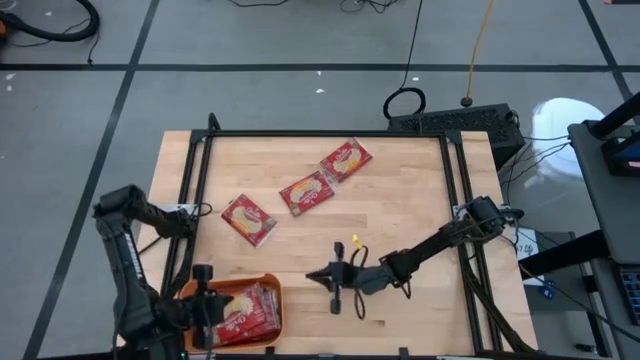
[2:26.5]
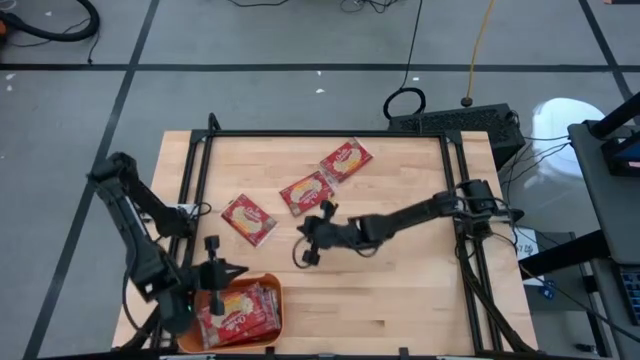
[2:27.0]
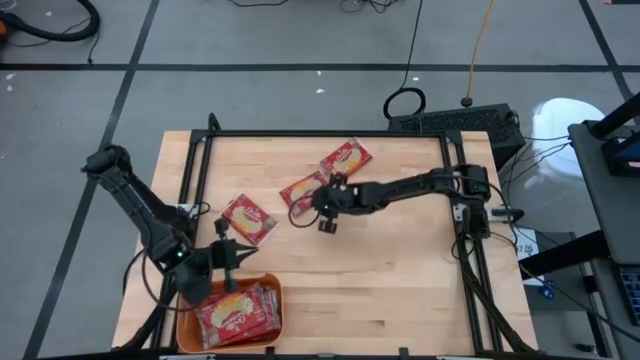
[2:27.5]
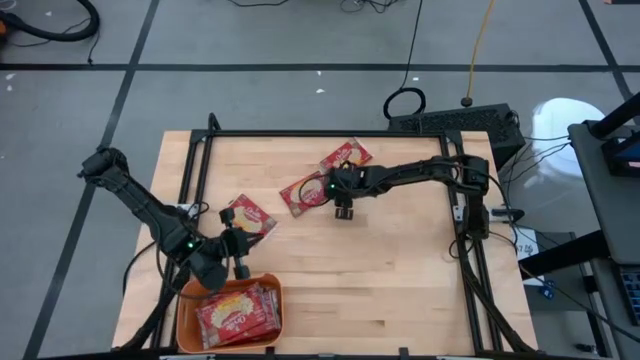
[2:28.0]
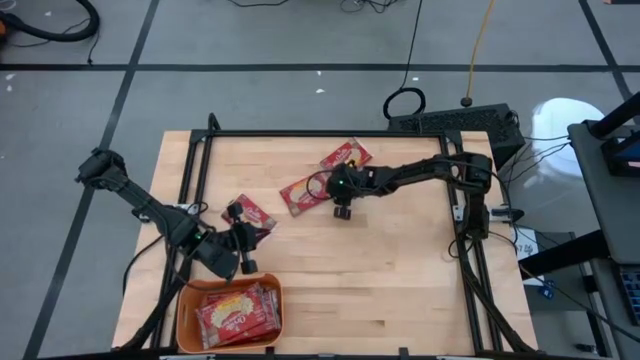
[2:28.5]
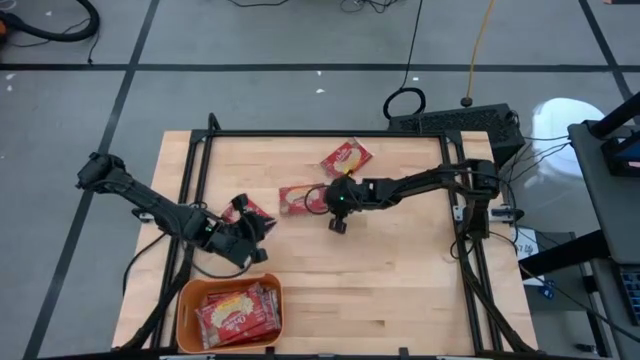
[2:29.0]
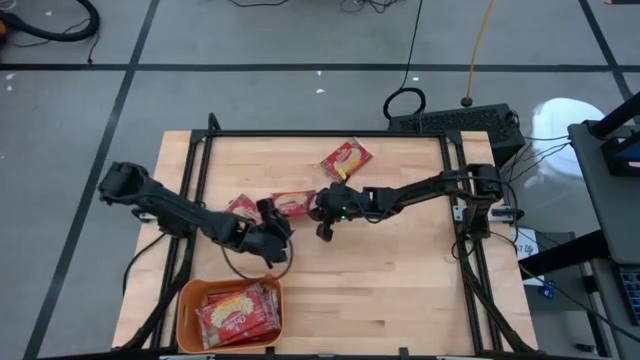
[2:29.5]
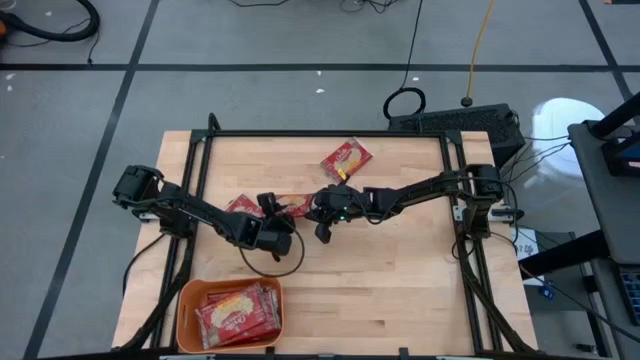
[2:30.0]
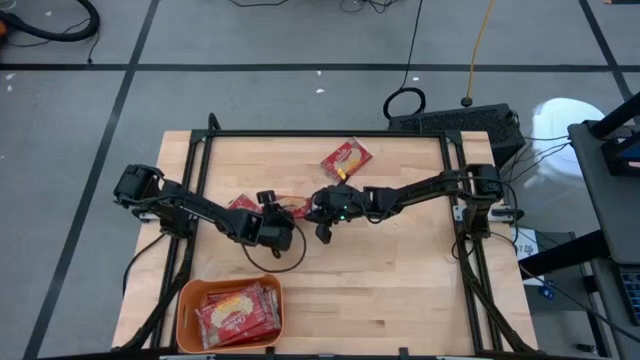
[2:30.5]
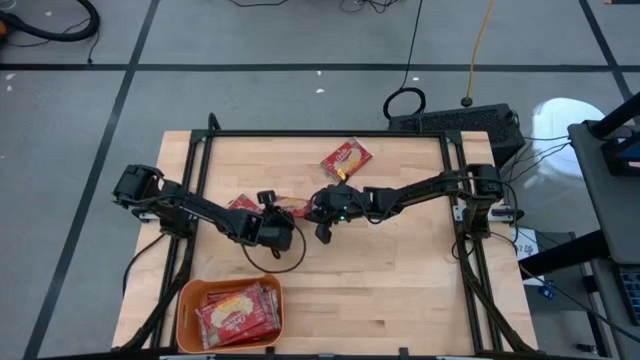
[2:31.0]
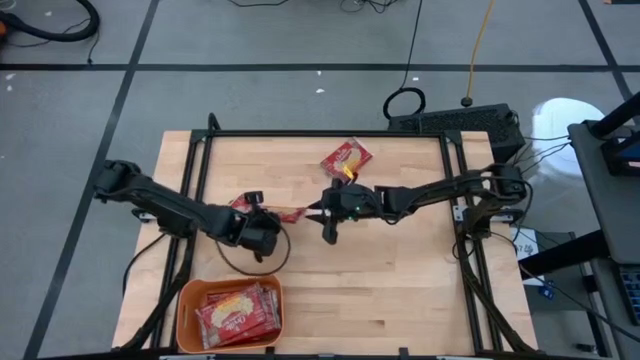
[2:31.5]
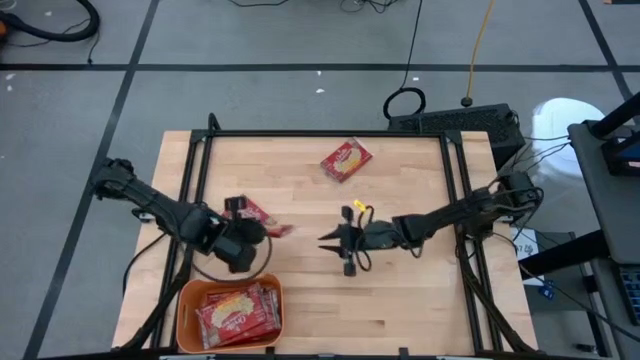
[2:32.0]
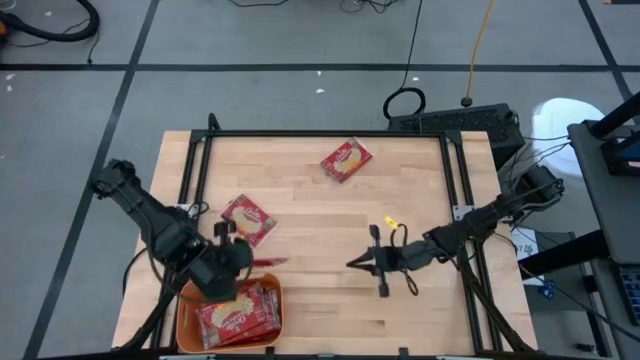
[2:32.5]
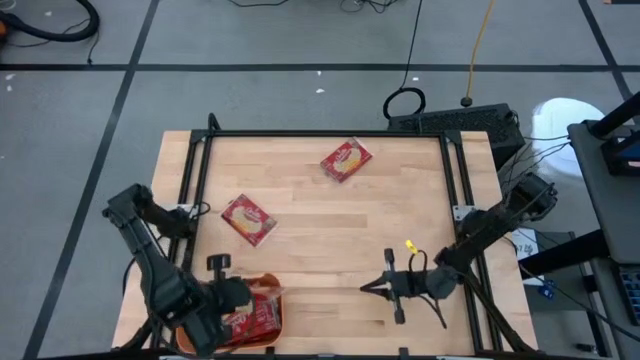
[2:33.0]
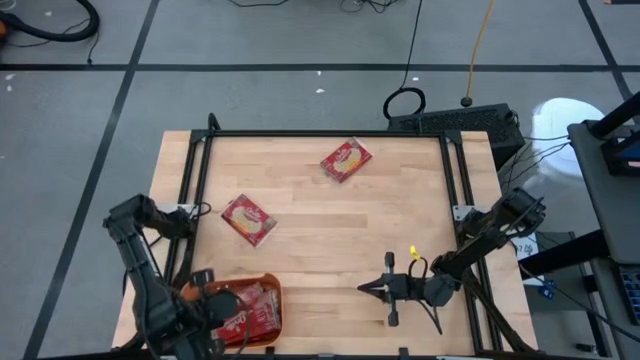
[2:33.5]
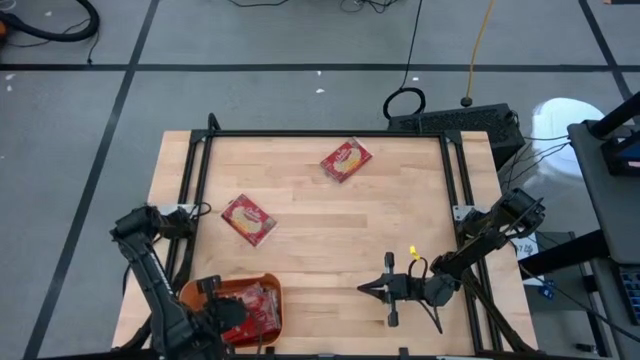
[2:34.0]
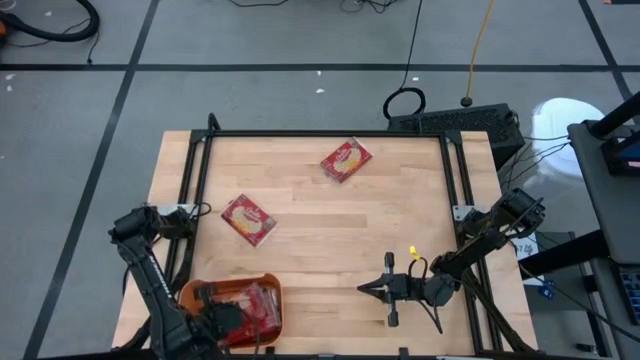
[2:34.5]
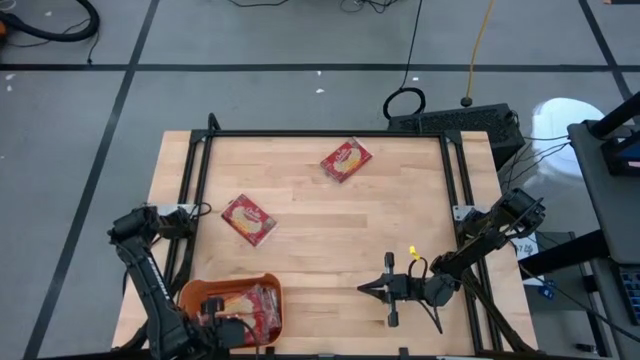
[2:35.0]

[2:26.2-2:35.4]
Task: Sort popcorn bags into baskets
Put the popcorn bag into the orange bin

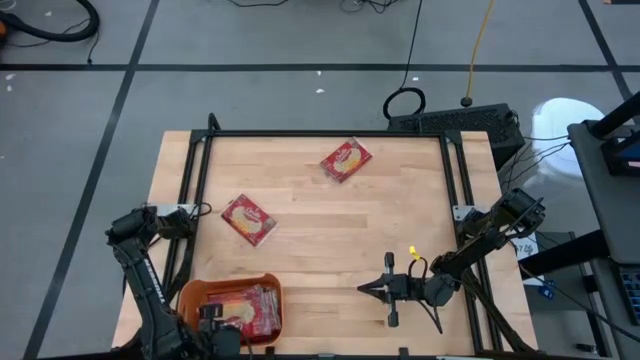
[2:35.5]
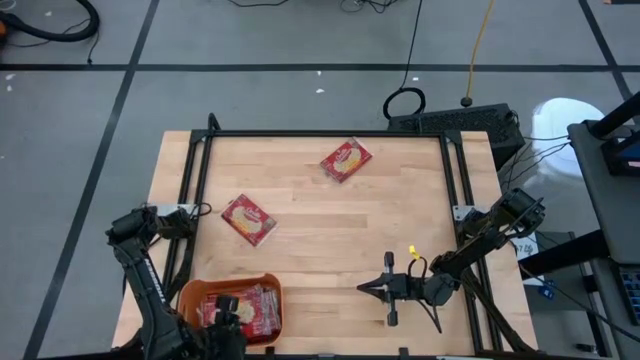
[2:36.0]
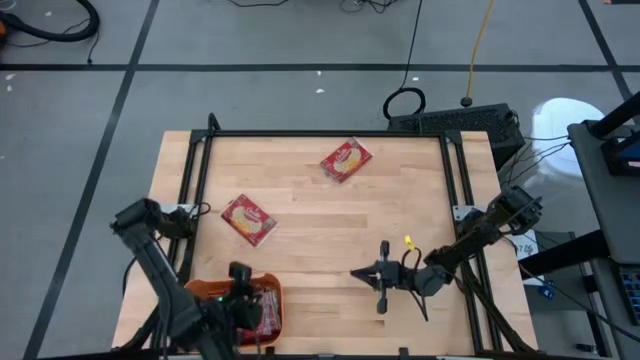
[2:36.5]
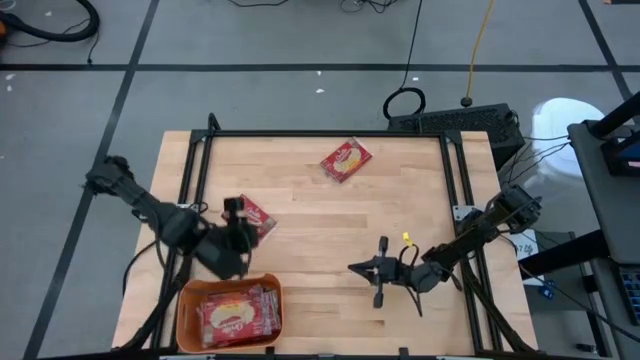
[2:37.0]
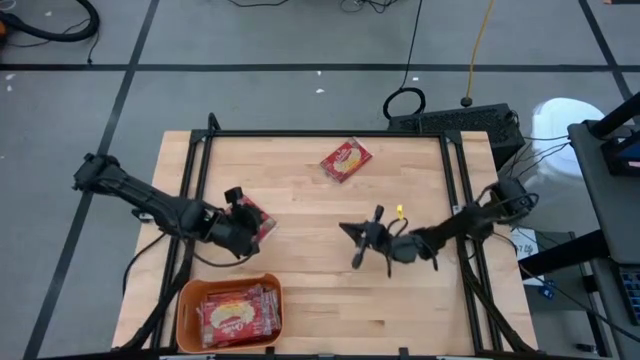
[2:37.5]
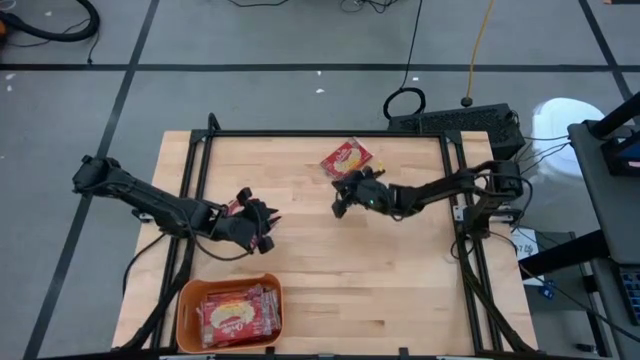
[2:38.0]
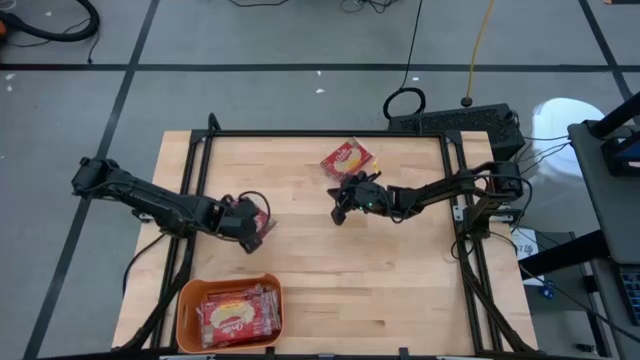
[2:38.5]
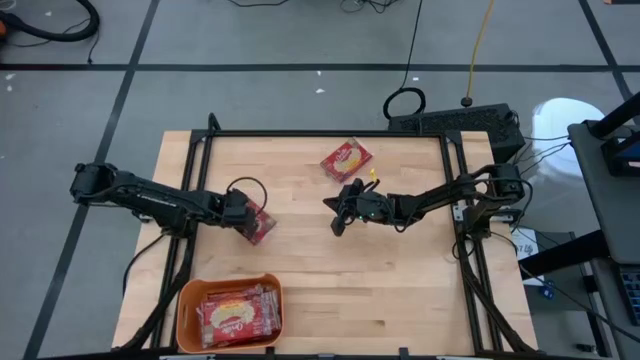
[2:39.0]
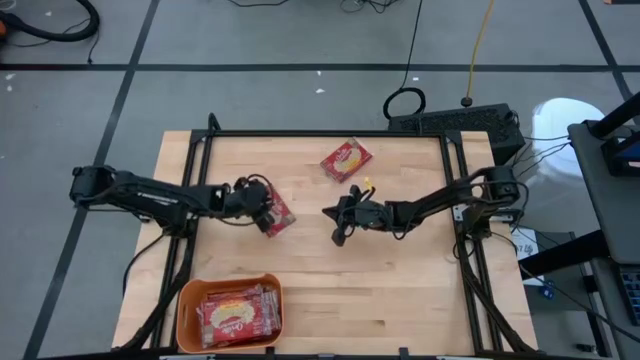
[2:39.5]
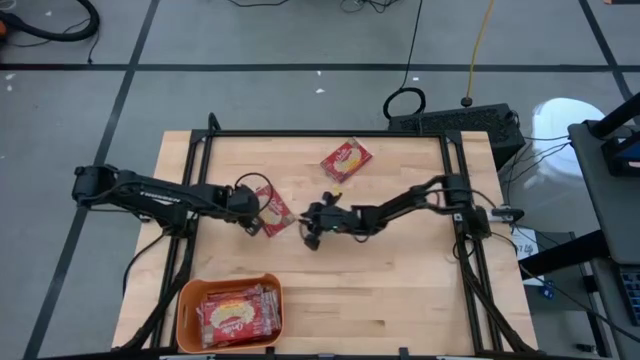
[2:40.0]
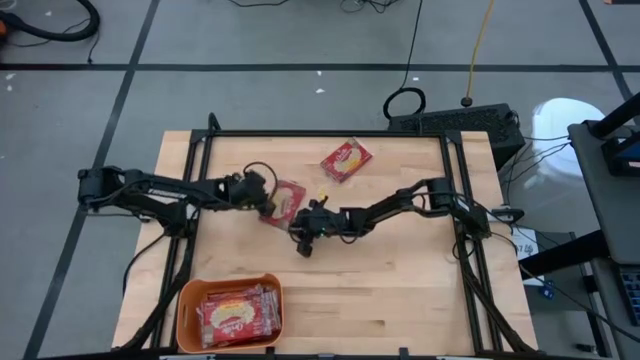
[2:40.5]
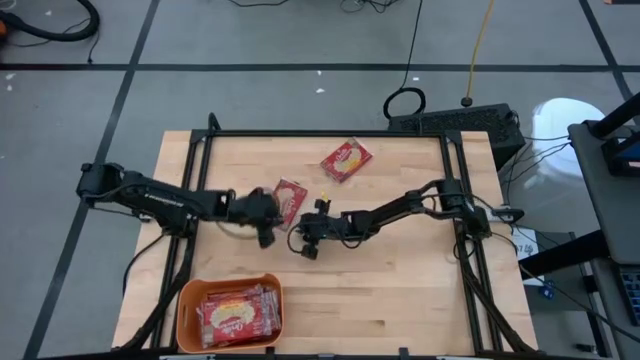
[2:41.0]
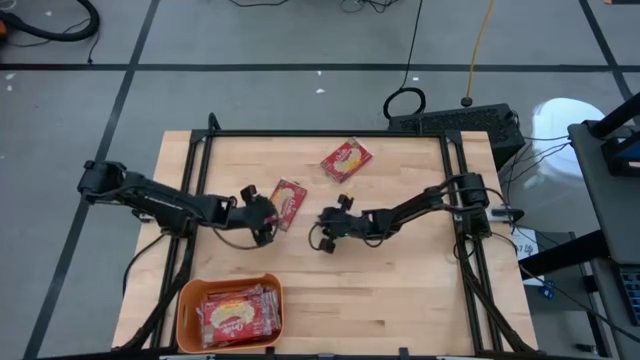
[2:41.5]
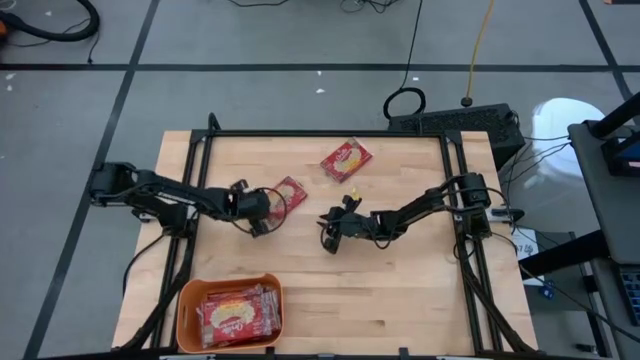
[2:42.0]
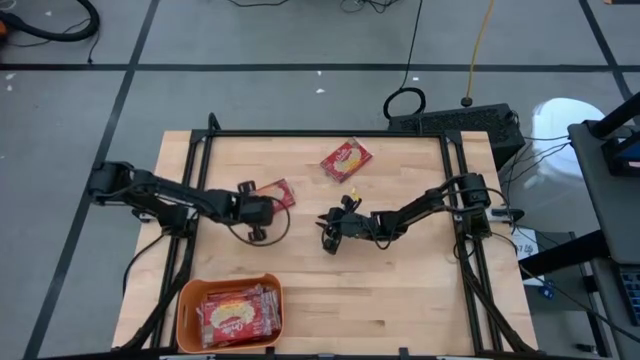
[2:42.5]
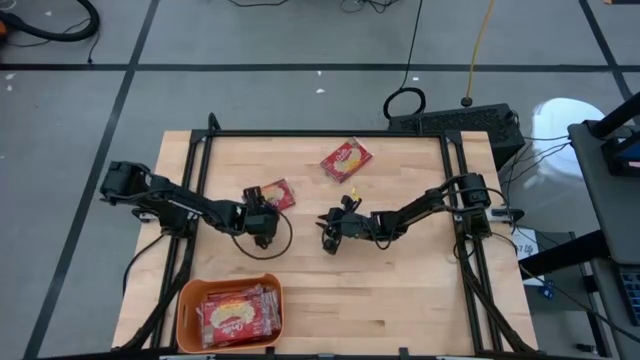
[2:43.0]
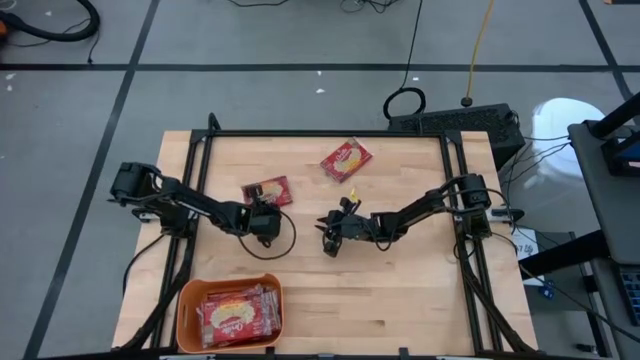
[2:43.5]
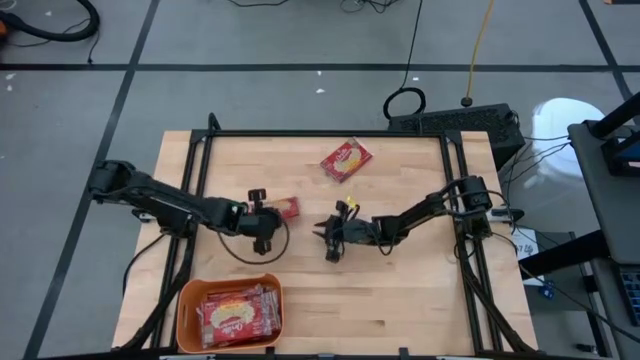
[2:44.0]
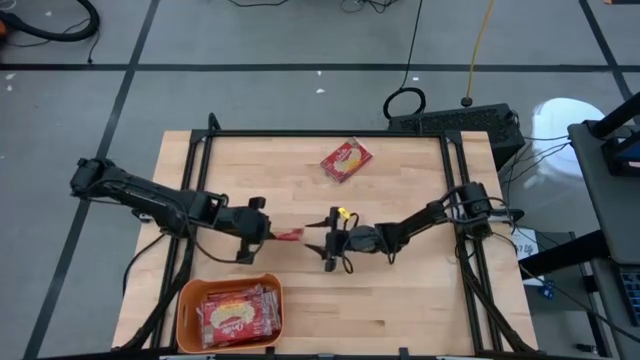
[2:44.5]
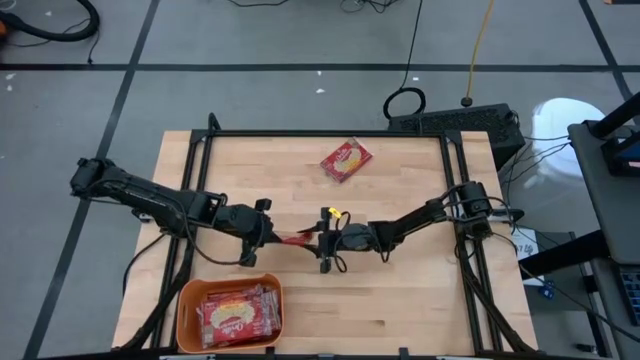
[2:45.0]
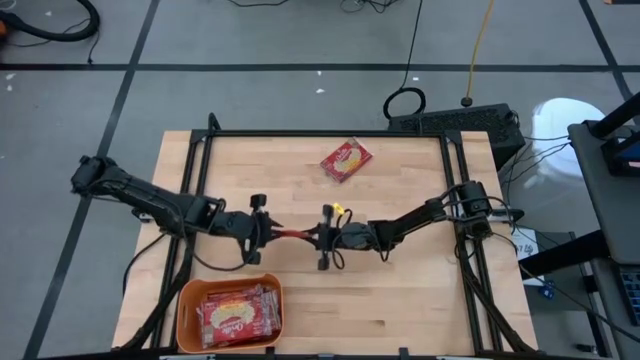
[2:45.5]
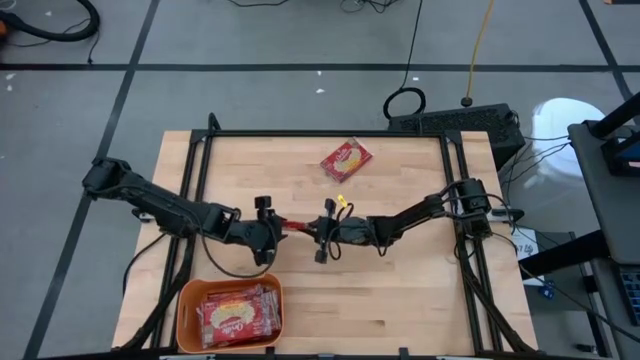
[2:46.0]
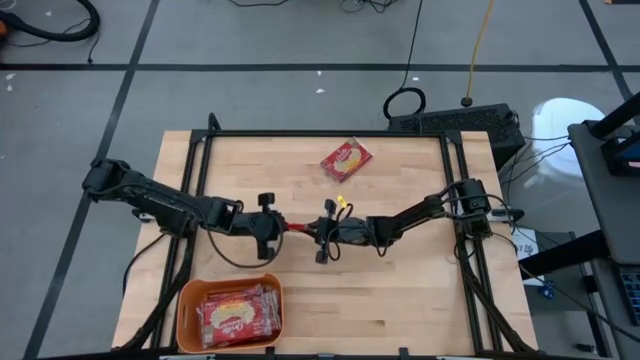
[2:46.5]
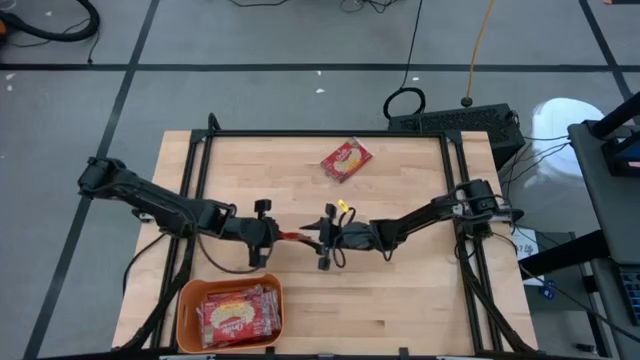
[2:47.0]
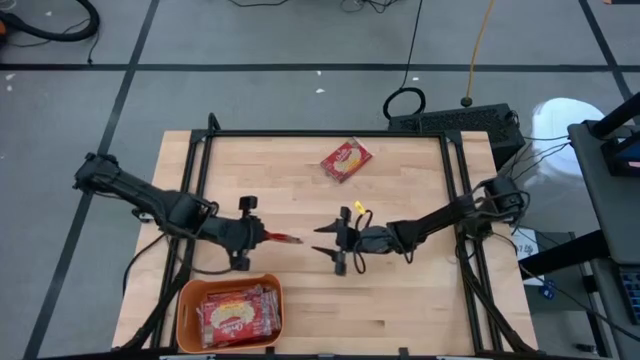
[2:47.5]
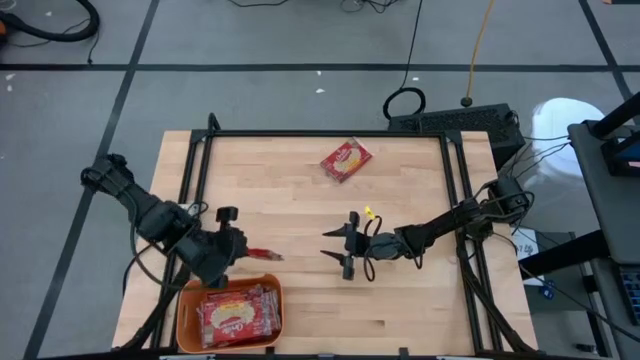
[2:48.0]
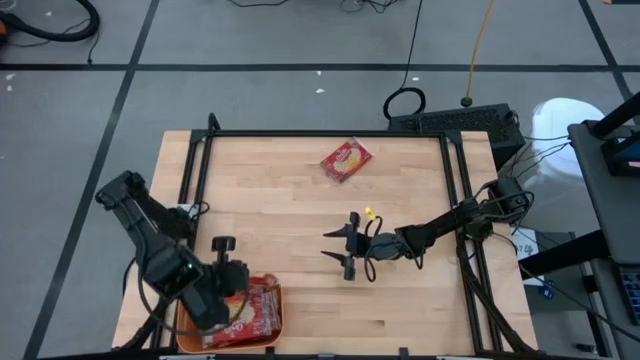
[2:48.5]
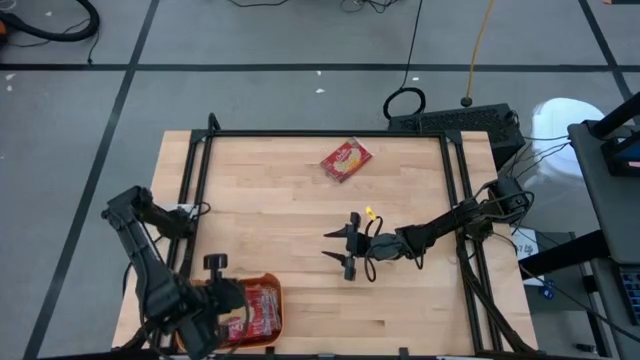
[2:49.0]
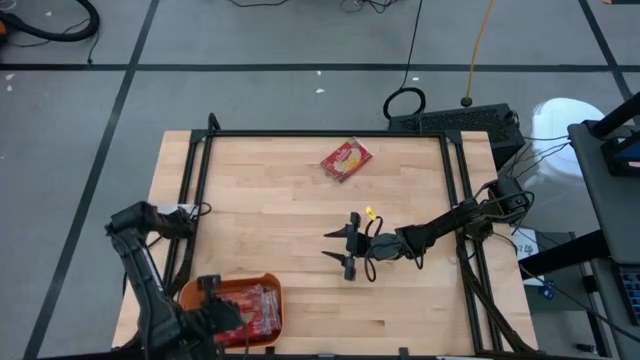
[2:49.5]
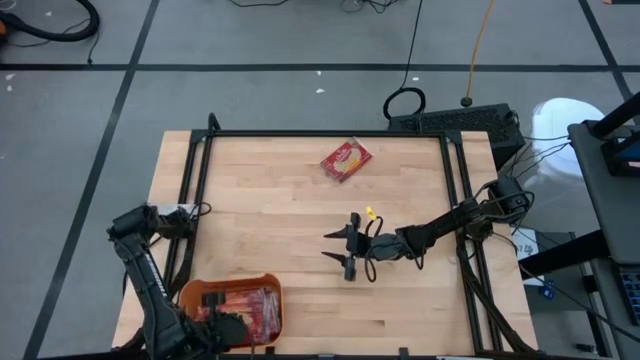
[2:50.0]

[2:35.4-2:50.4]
Put the popcorn bag into the orange bin
